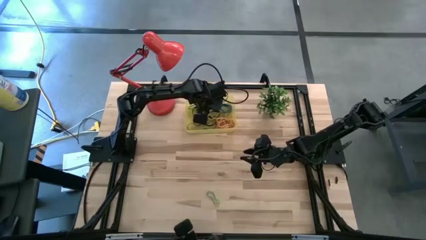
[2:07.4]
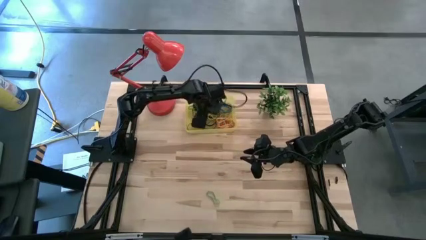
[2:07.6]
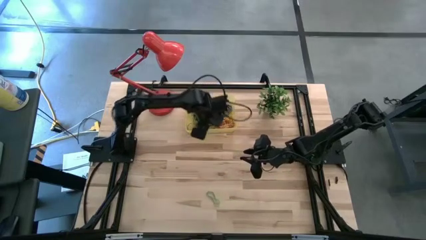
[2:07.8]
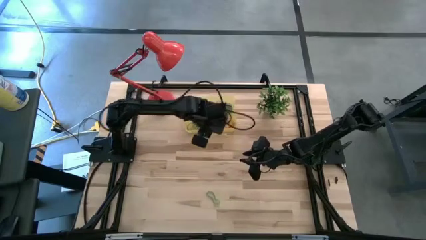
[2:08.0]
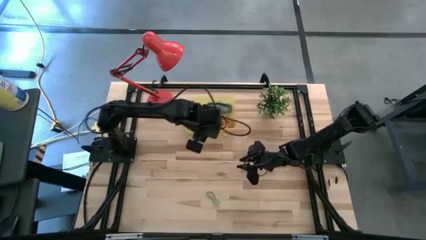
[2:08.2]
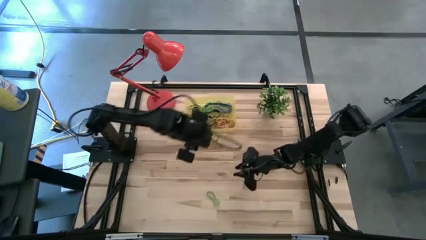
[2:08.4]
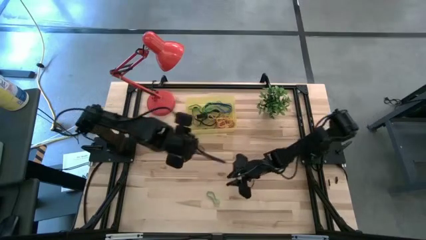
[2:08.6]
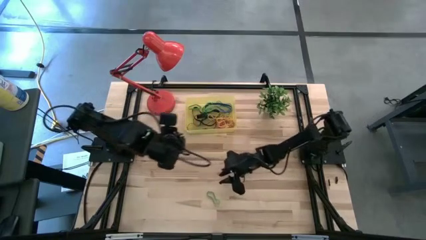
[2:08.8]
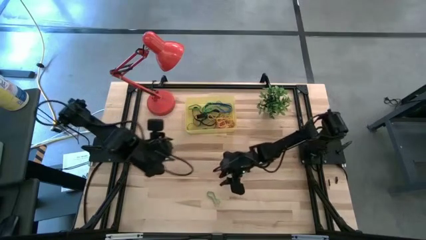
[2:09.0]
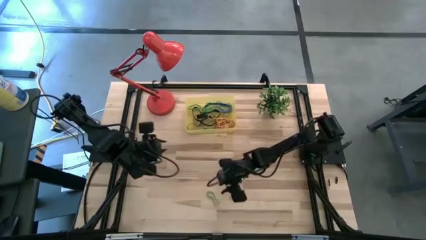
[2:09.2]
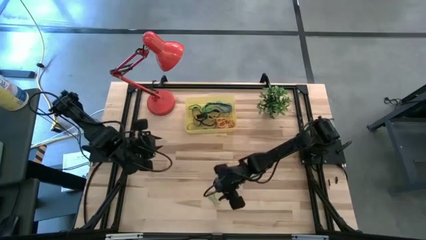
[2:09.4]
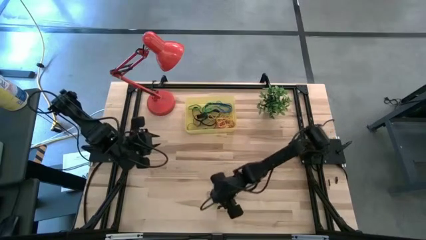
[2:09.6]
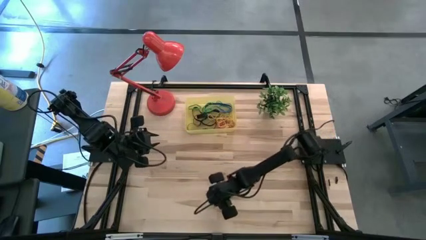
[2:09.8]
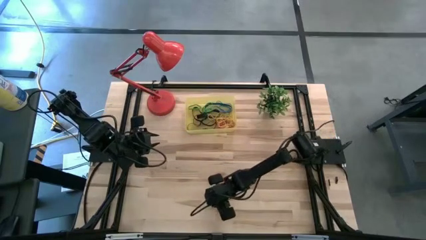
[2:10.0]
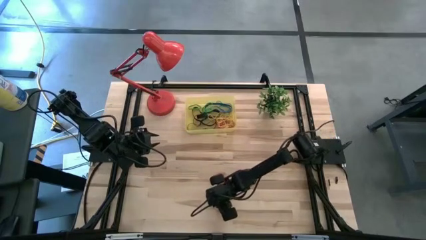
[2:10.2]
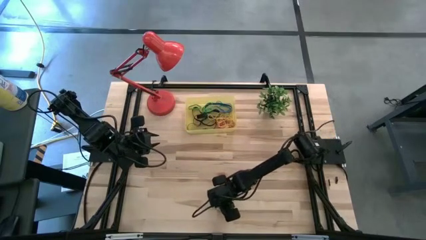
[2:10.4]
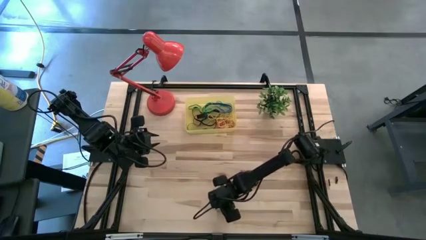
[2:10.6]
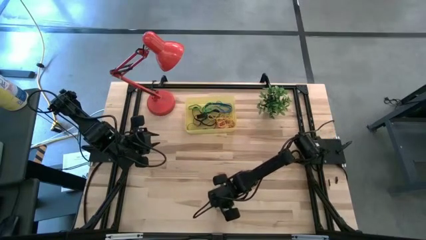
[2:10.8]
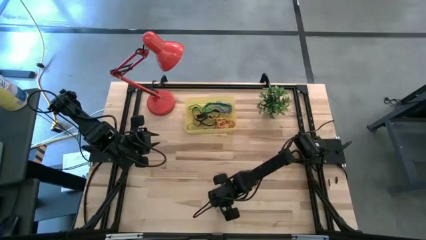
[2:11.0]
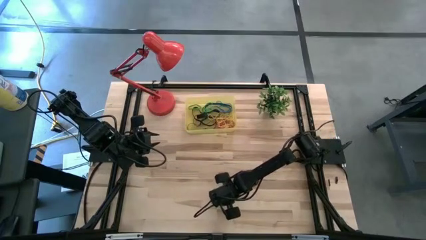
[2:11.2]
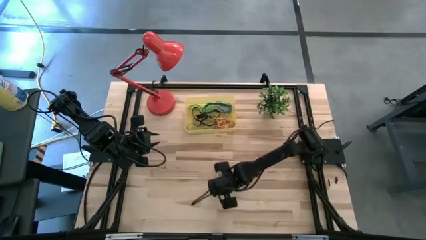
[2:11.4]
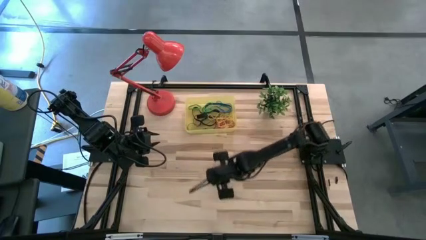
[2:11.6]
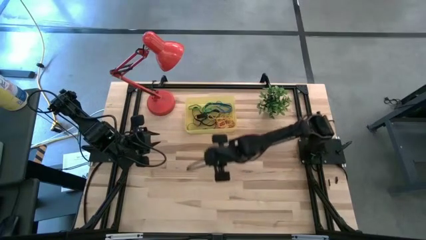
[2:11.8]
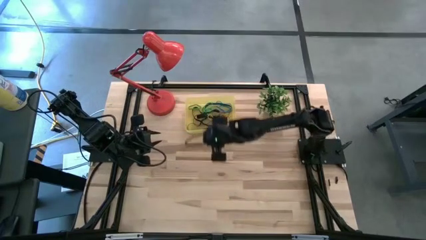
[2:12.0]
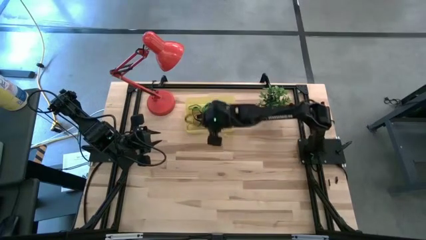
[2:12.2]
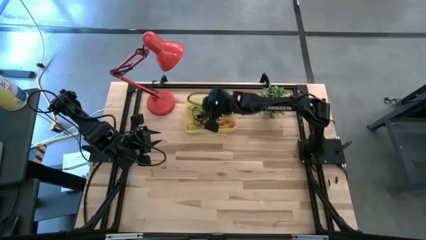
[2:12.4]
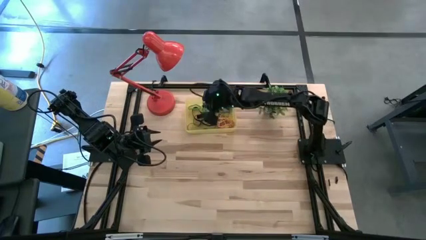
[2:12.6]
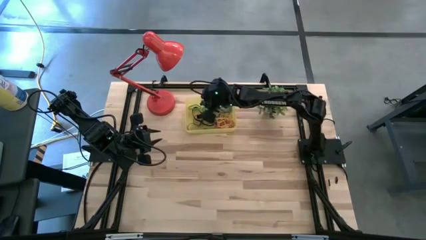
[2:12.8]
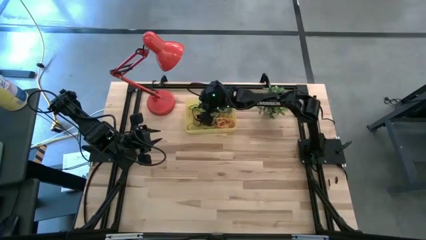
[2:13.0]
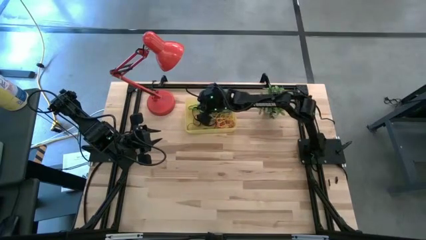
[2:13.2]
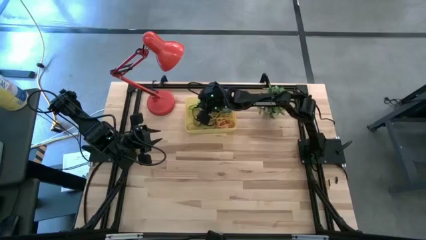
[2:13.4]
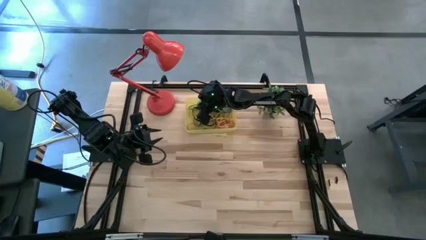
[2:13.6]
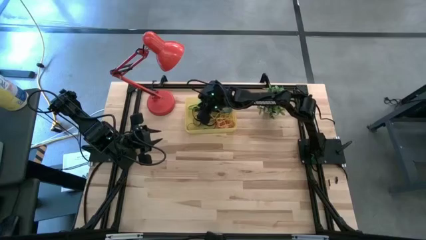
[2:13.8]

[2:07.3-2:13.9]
Task: Pick and place rubber bands into bin
Put the green rubber band into the yellow container

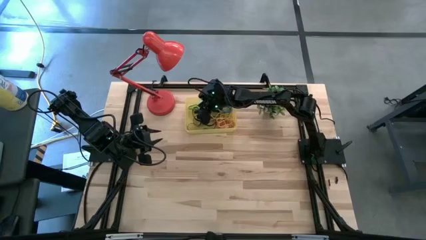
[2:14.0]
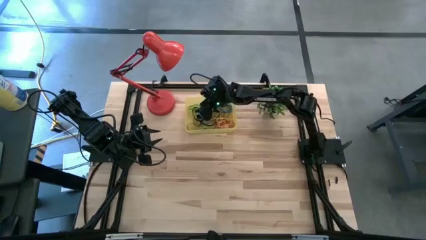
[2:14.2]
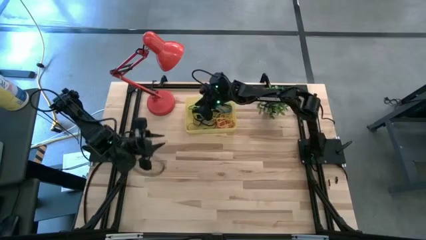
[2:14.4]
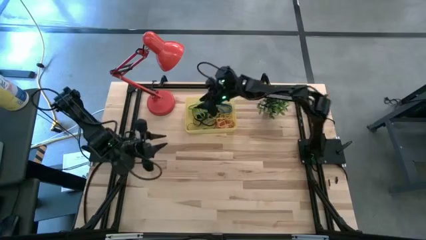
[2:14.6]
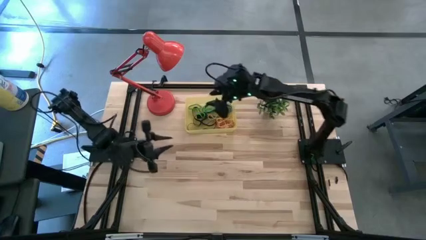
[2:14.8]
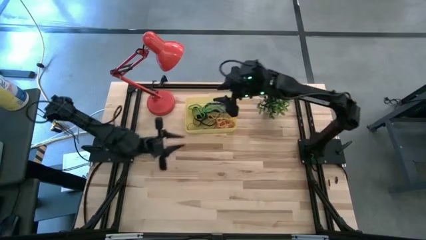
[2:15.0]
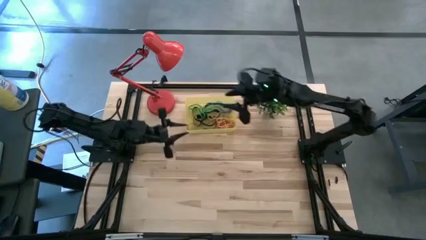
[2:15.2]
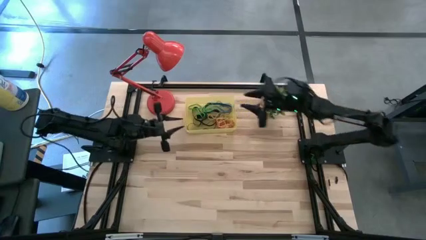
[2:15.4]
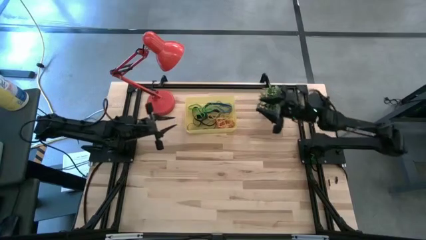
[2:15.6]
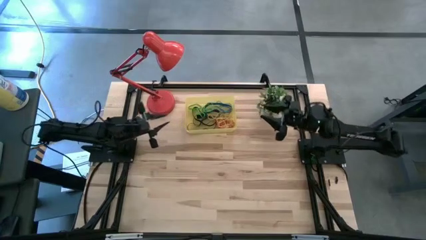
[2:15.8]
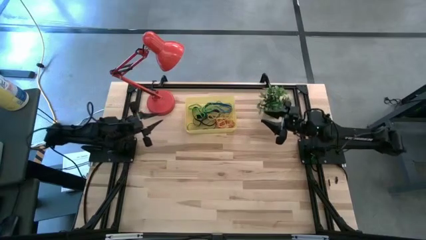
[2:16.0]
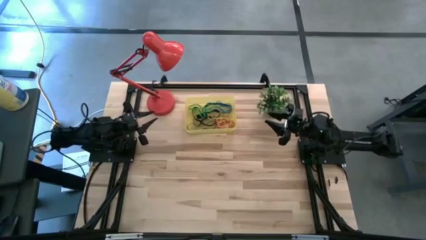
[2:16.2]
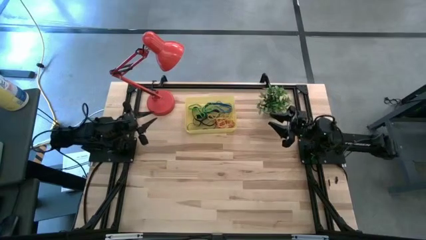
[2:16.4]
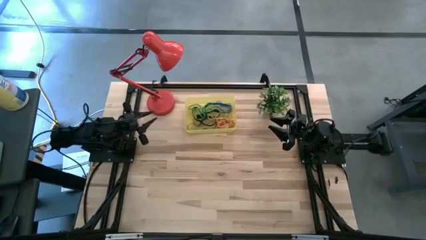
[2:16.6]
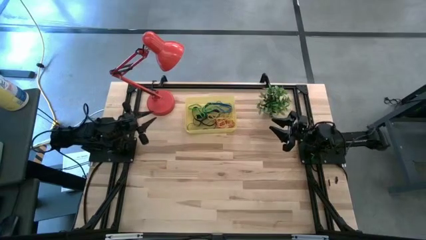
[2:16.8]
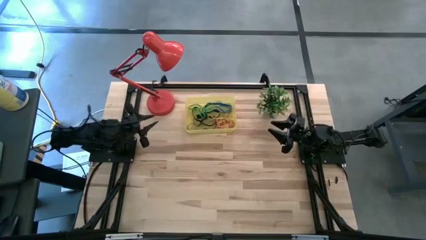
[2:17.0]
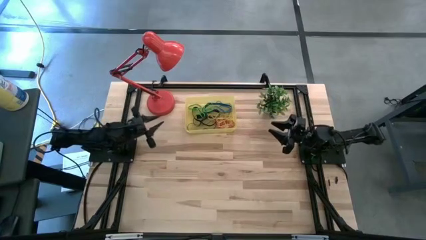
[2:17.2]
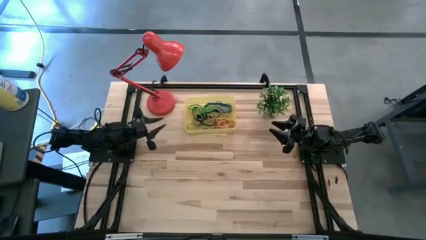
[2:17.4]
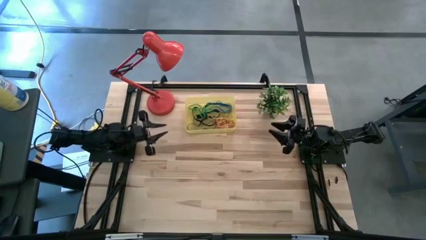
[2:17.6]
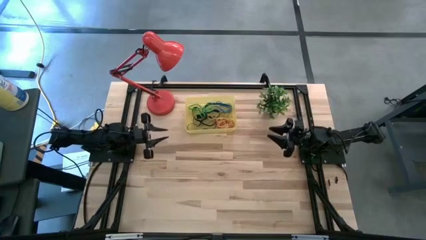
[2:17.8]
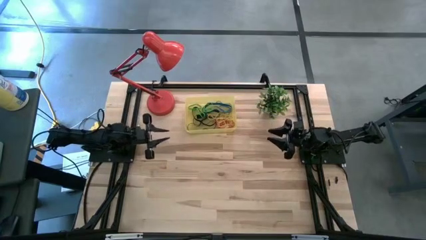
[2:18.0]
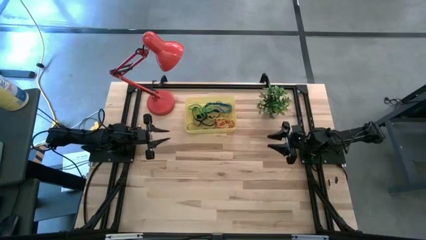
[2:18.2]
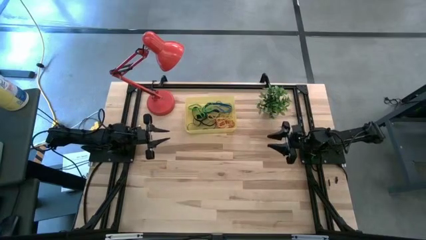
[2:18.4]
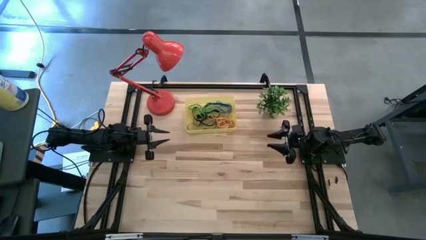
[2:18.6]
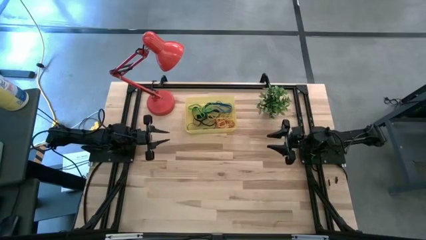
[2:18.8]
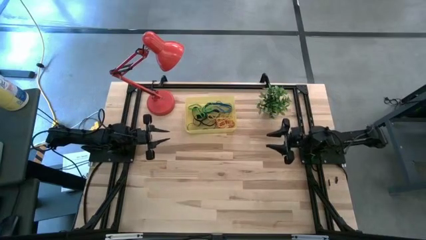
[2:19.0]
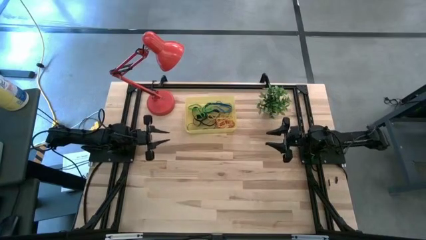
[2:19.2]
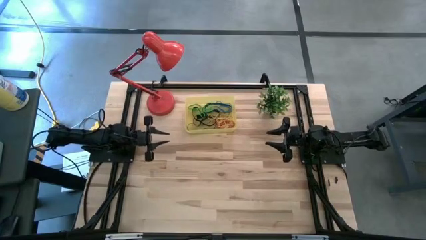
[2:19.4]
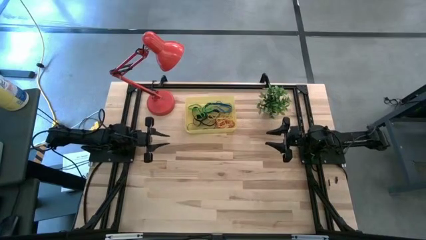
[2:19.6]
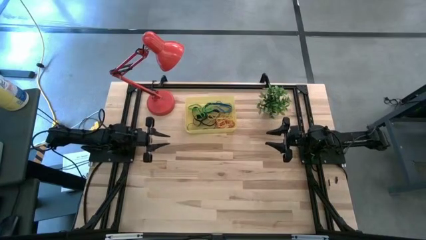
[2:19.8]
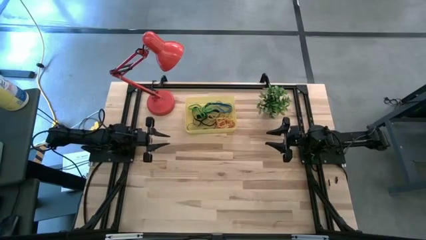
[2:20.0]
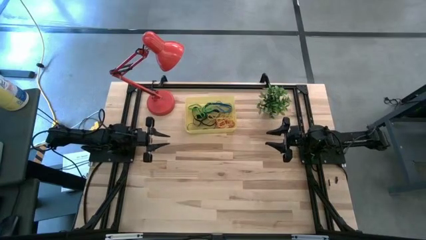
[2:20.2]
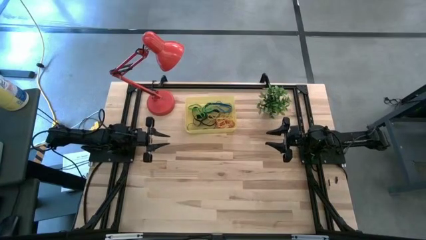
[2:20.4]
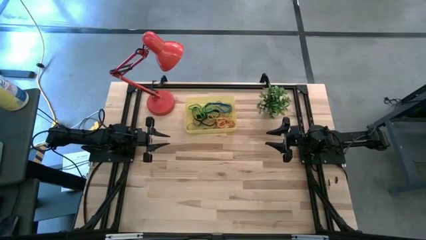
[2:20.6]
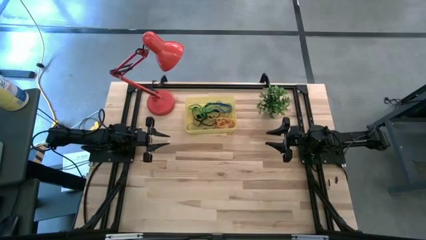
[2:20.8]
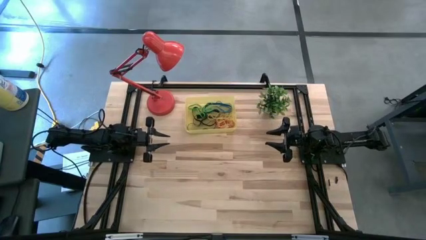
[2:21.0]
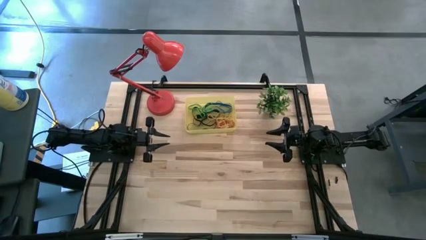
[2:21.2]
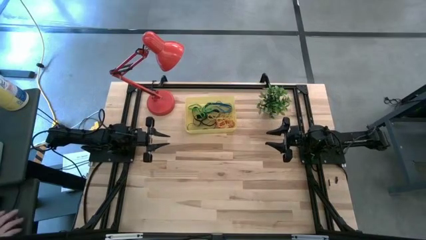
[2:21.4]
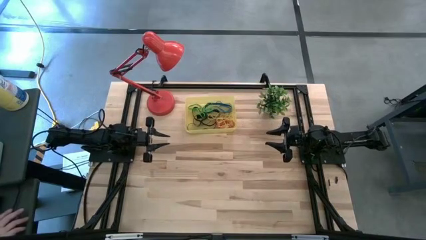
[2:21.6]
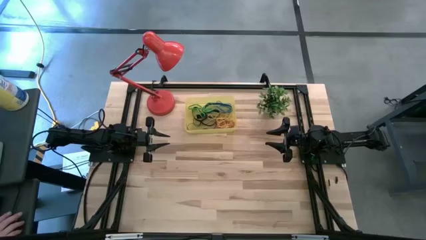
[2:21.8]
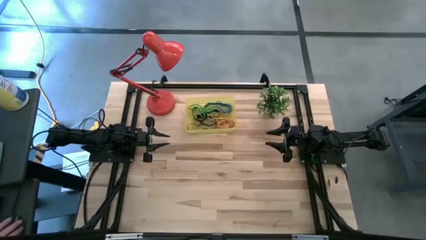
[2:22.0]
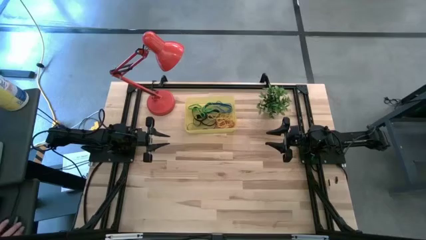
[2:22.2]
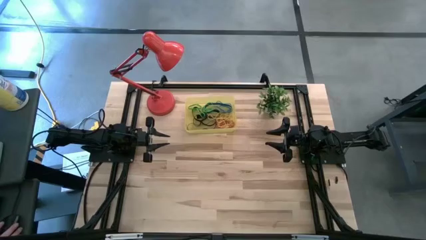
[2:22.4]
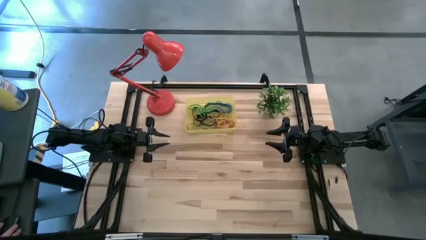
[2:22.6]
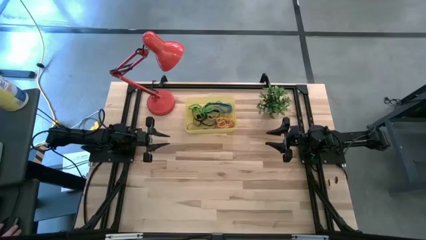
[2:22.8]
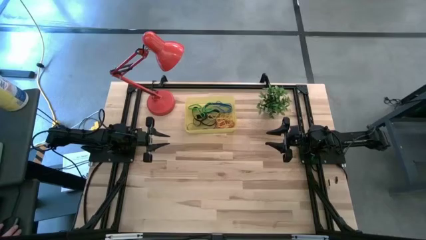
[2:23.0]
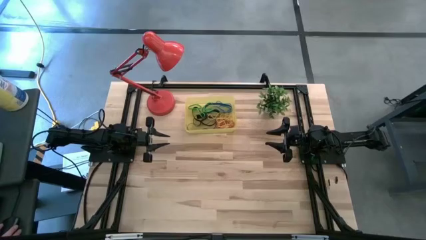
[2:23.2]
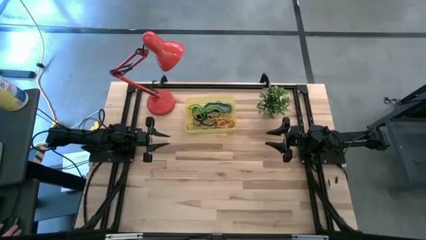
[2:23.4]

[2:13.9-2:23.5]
Return to Home Position
